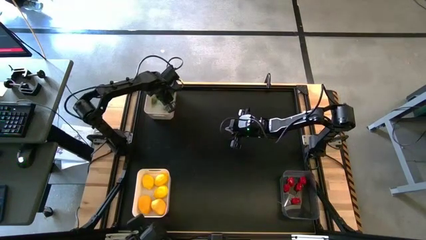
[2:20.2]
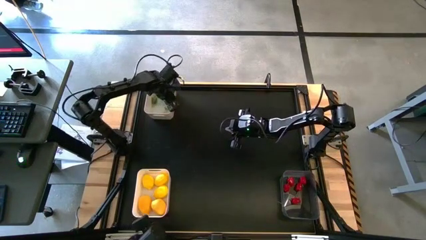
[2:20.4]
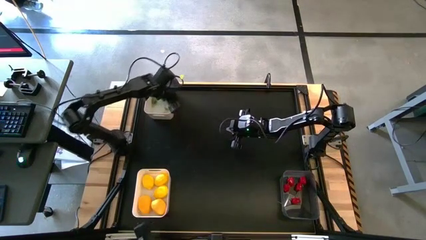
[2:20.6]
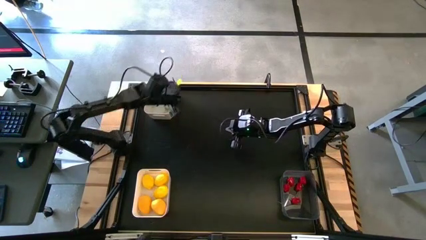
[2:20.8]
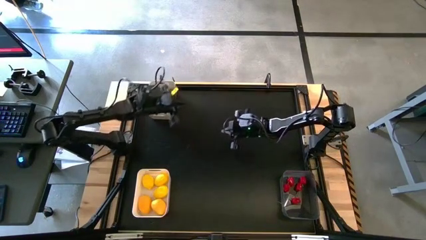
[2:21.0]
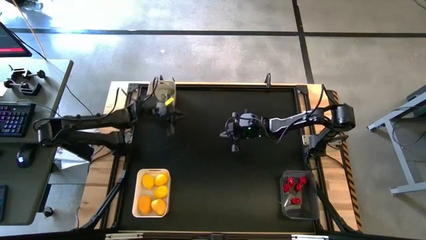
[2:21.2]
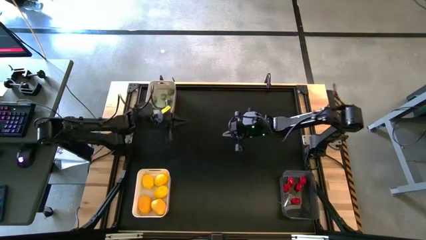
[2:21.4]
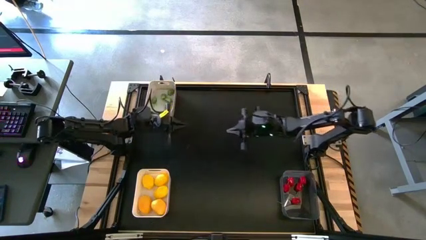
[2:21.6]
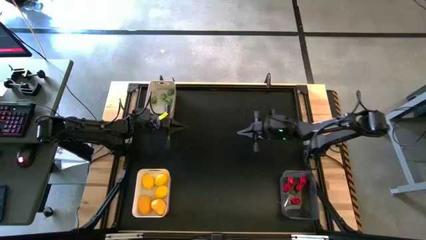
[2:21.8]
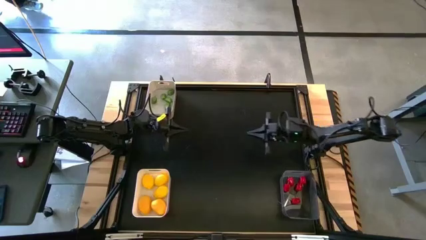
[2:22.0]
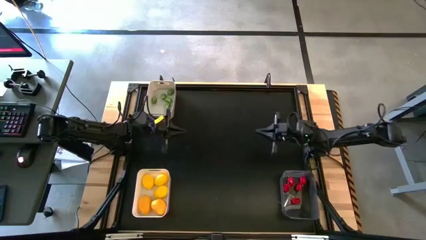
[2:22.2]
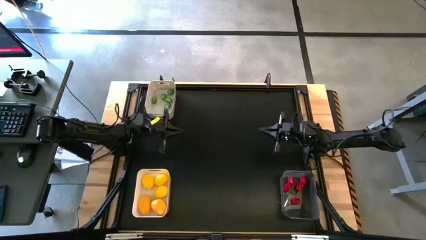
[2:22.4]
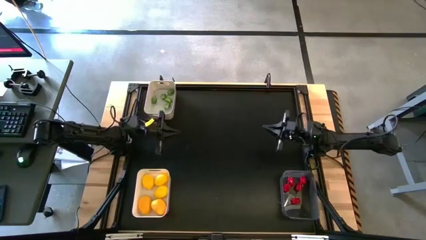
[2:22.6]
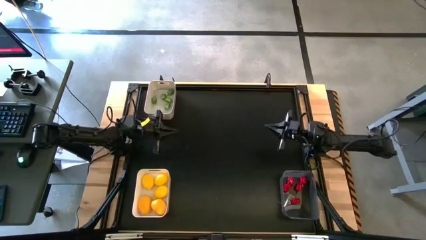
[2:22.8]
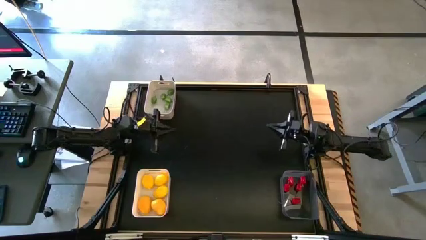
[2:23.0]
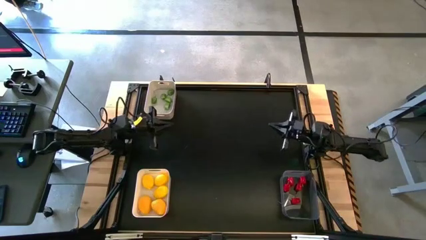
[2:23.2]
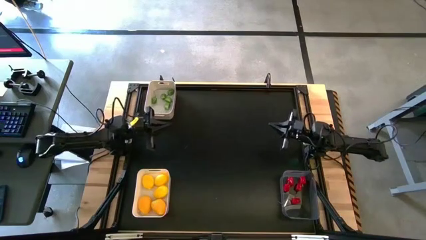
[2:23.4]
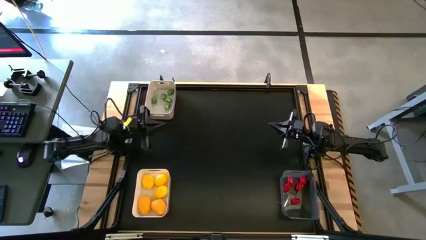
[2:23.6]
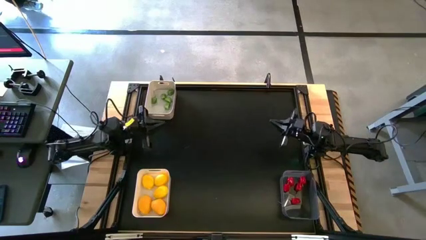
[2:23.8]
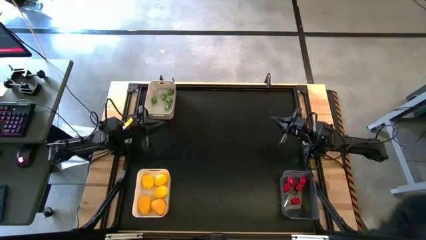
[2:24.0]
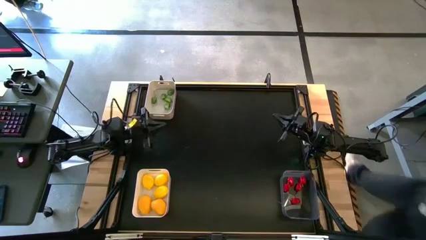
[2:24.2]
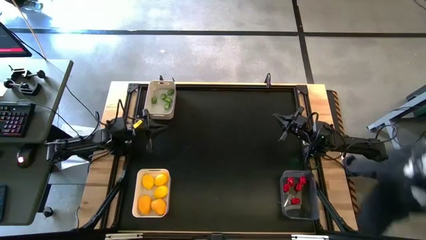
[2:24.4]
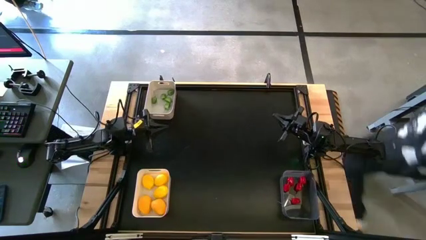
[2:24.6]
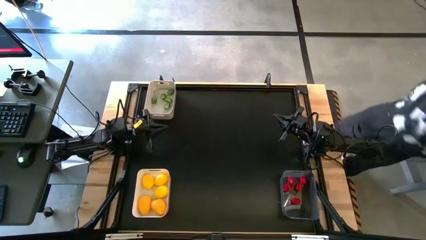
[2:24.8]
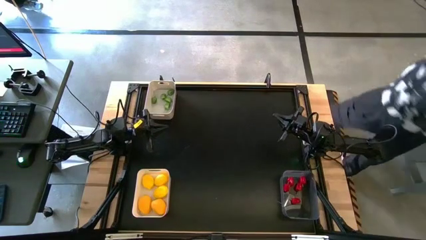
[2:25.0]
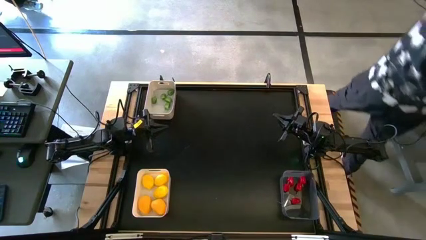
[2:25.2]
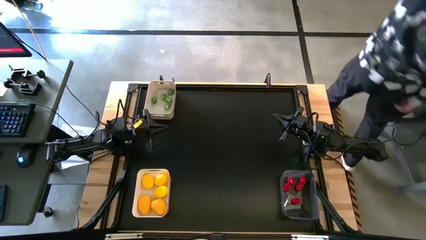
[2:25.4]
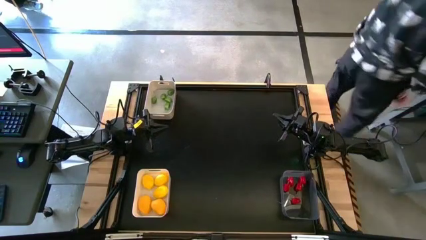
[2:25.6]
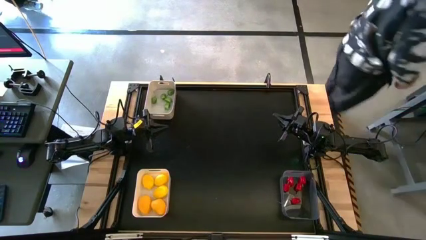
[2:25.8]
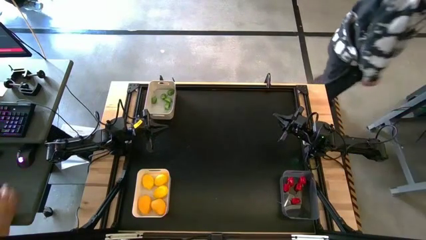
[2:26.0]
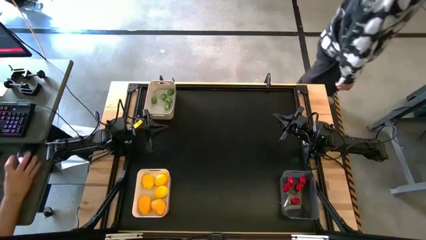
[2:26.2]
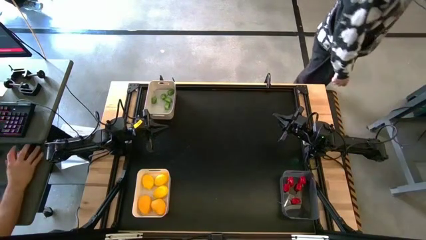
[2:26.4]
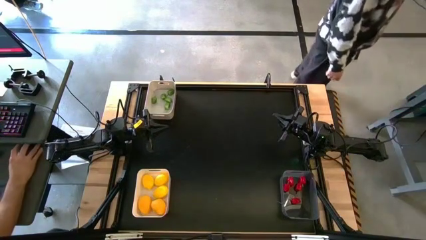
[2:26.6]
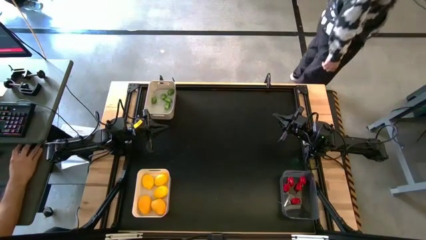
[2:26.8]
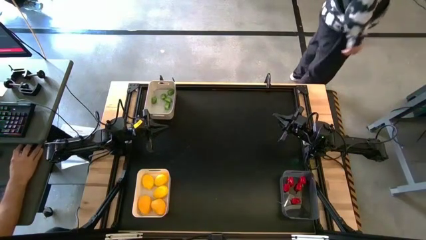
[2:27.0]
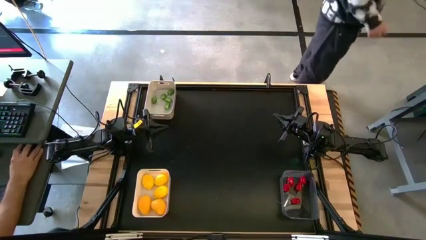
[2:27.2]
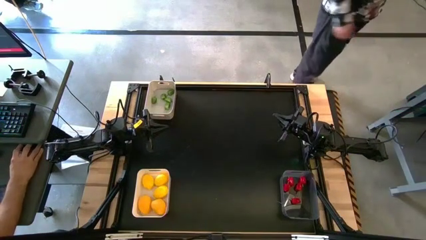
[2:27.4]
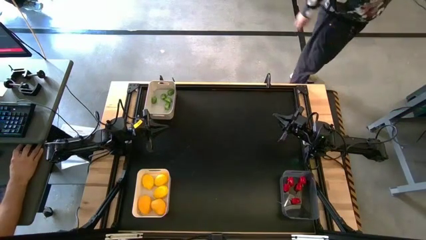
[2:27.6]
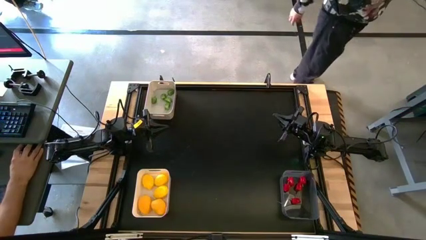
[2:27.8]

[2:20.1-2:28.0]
Task: Sort produce into baskets
Return to Home Position

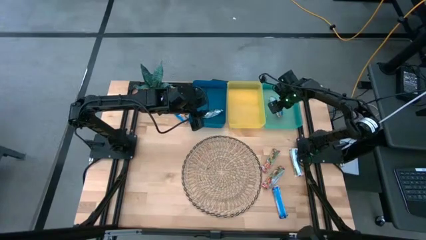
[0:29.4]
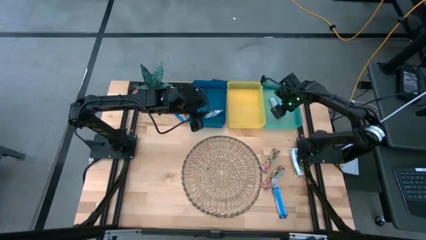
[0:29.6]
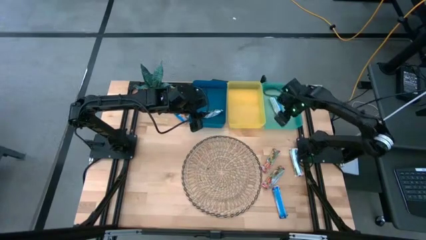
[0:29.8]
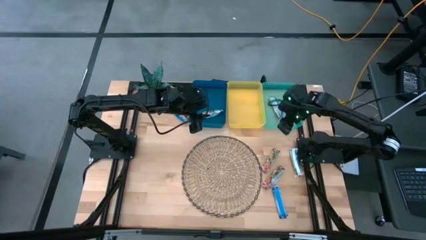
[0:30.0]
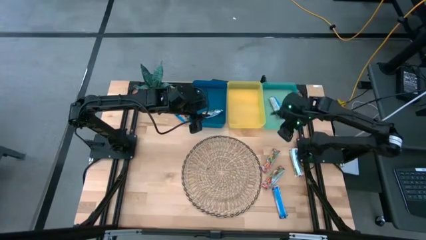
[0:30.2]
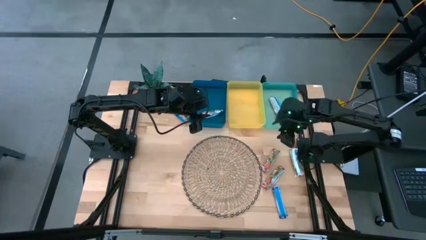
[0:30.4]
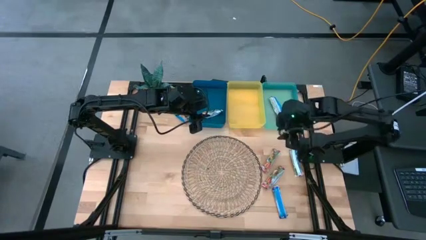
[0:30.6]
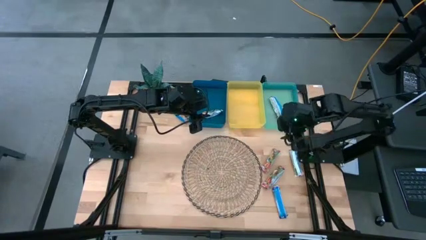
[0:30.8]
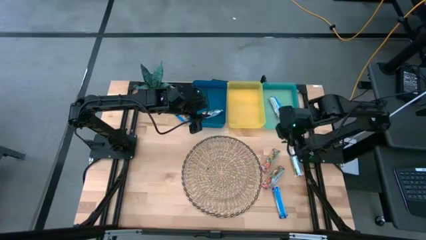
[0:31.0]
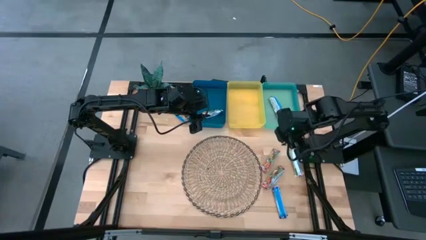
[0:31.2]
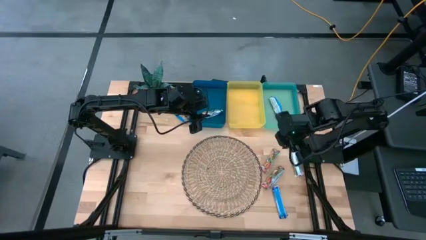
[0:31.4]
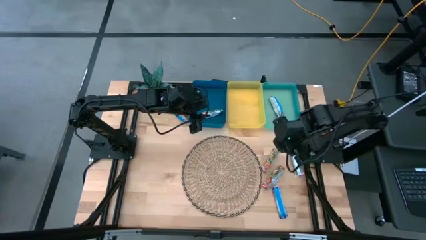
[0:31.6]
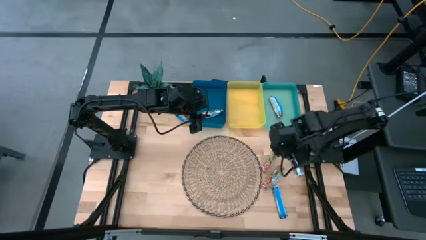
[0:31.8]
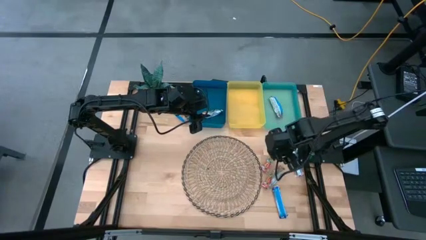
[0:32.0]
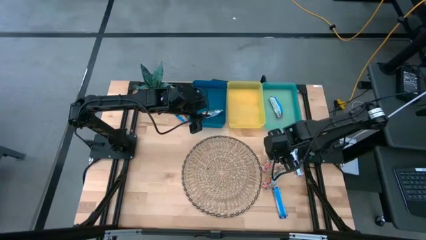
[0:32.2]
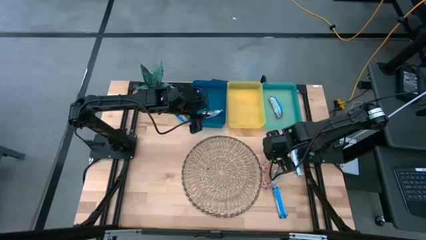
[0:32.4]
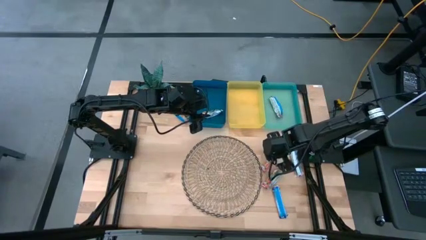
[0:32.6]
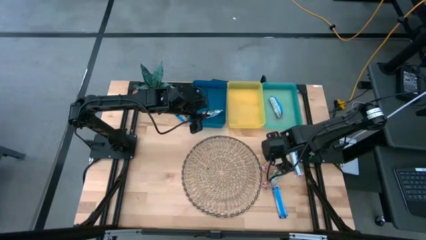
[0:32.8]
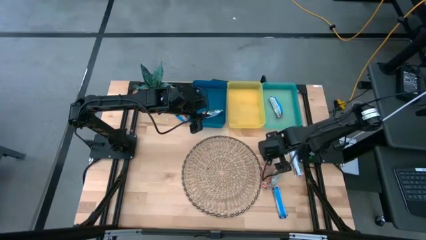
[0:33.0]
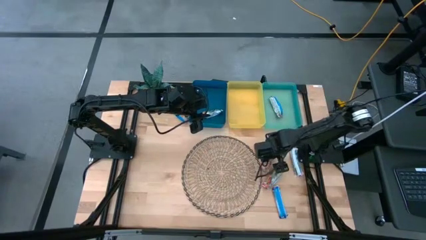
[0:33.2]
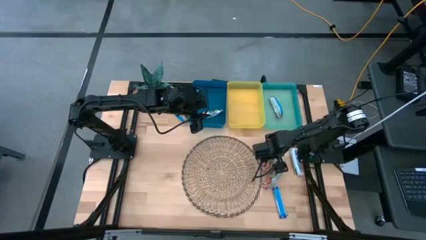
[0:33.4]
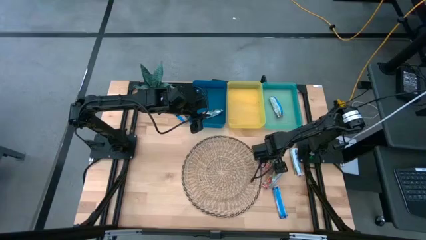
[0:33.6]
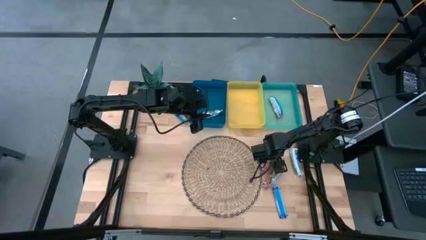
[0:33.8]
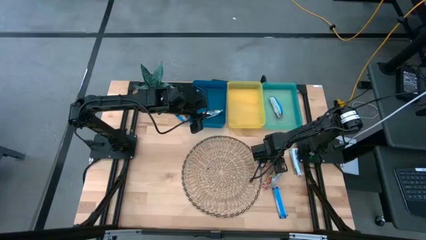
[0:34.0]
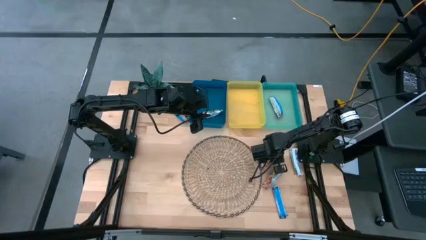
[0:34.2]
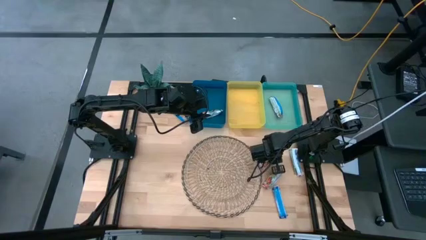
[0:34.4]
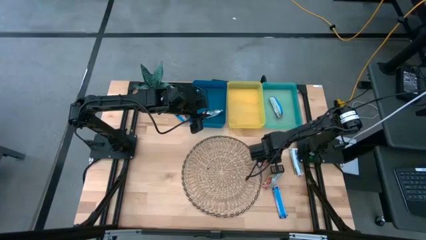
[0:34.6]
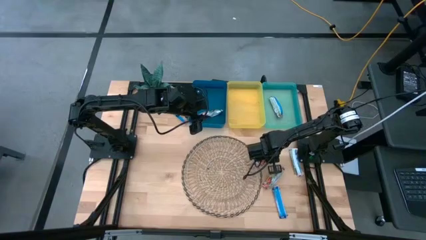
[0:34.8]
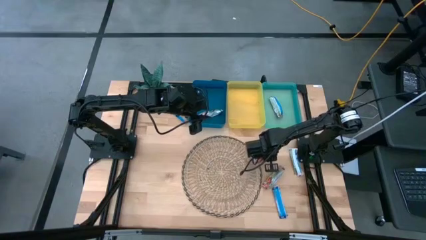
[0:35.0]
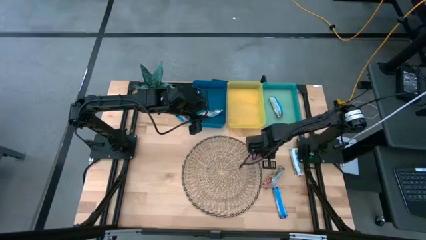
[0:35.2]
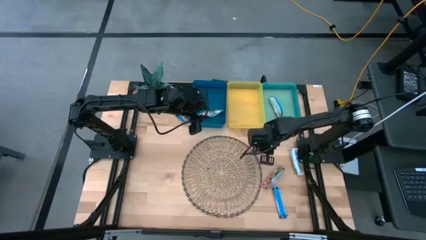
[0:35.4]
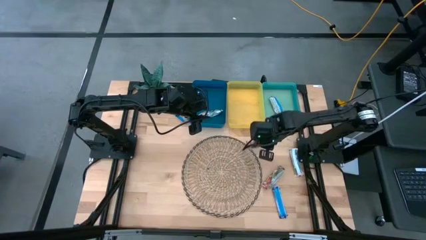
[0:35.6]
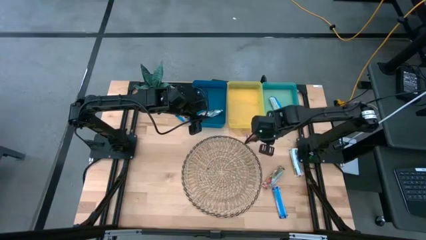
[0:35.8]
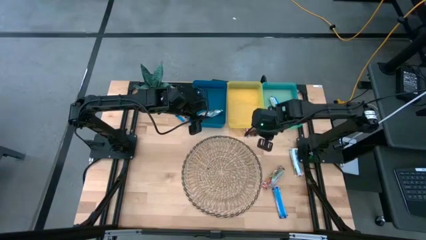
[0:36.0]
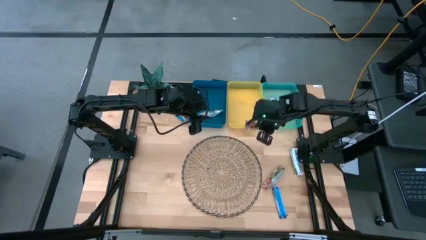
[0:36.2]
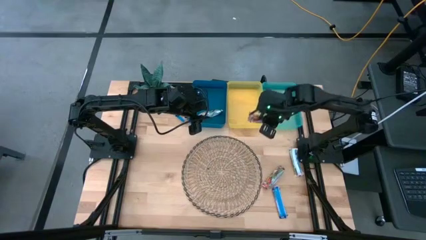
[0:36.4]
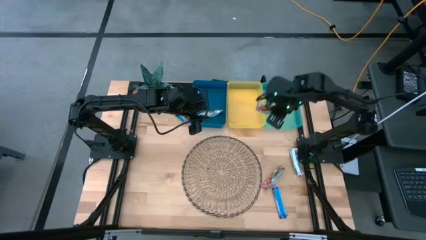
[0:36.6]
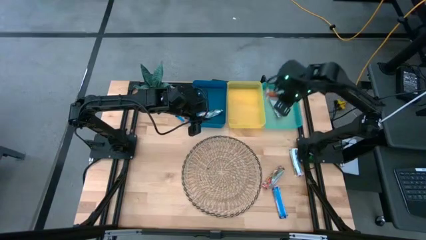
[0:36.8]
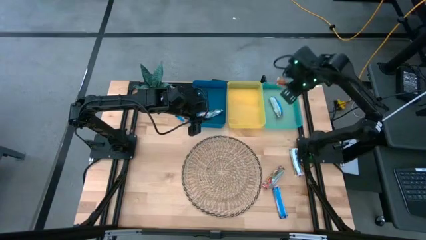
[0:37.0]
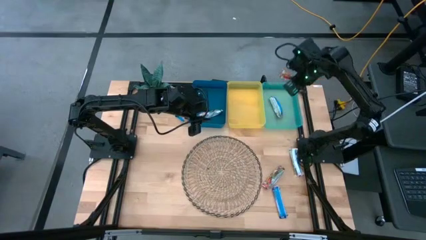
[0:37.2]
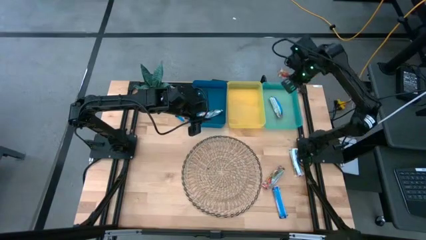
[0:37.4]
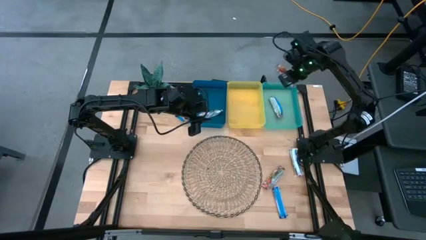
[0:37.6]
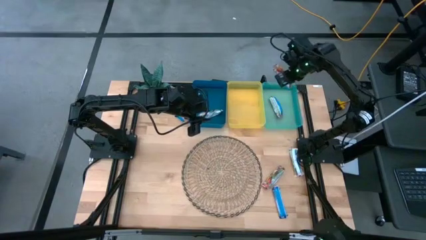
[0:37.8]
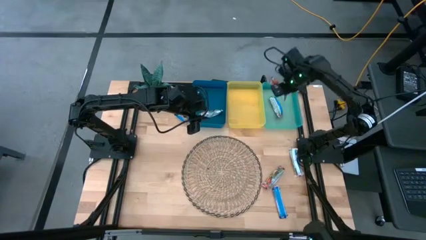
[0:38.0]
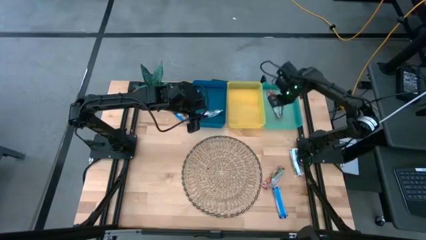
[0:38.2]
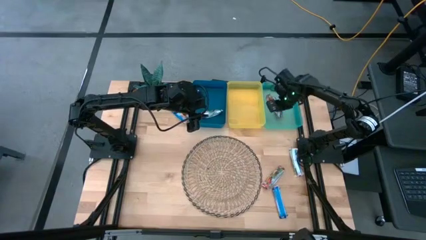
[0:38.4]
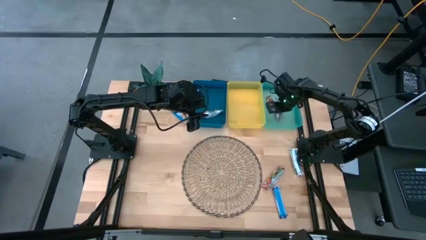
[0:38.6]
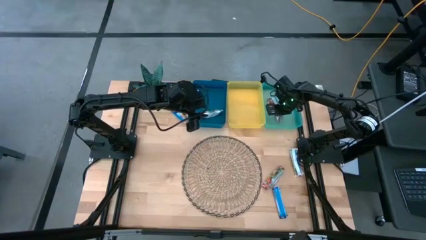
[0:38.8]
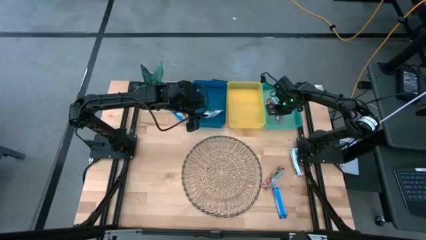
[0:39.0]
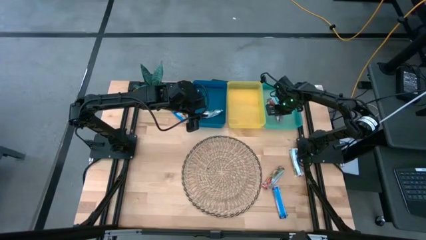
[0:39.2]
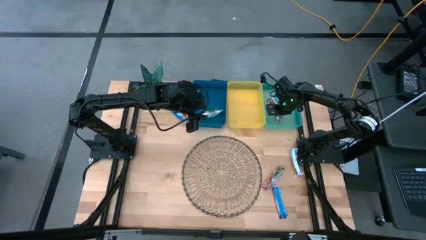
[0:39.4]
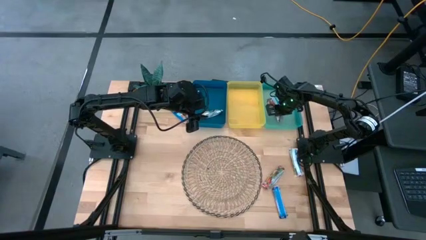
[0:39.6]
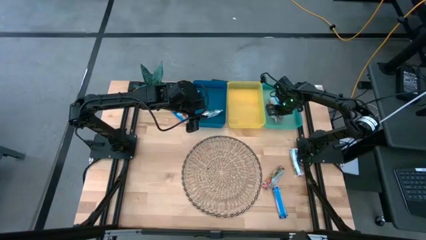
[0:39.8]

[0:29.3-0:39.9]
Task: Pick and place Granola Bars by type
Put the red granola bar into the green bin
